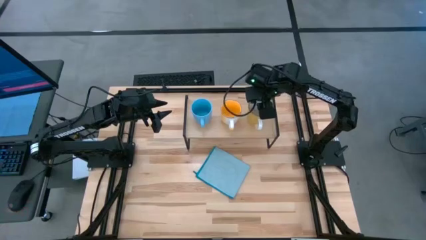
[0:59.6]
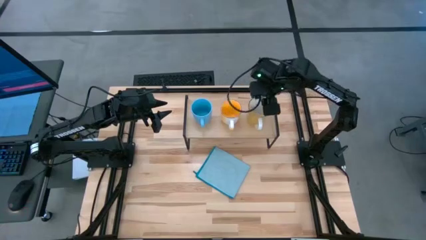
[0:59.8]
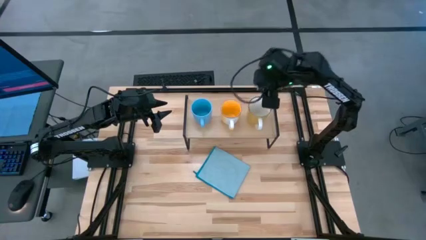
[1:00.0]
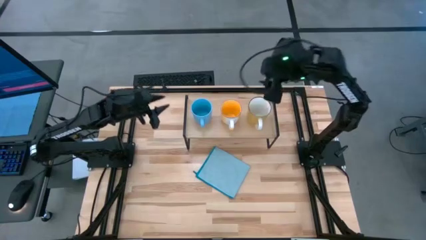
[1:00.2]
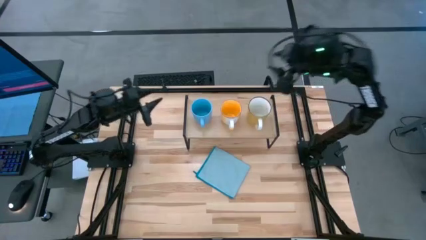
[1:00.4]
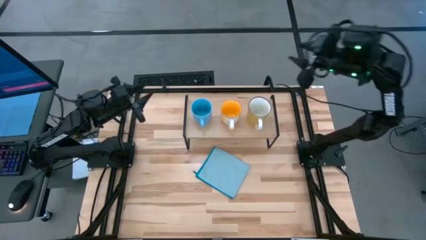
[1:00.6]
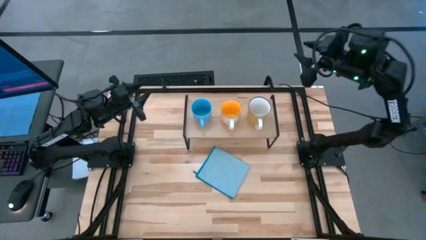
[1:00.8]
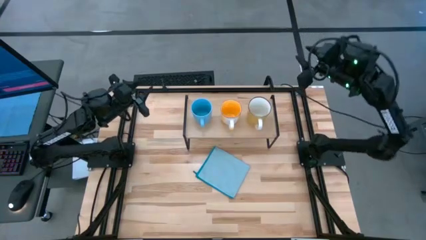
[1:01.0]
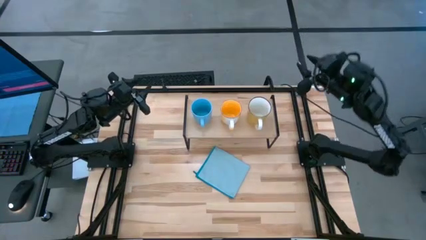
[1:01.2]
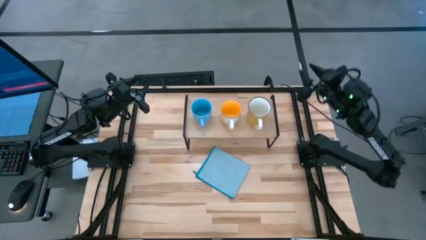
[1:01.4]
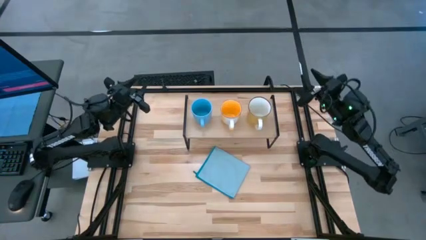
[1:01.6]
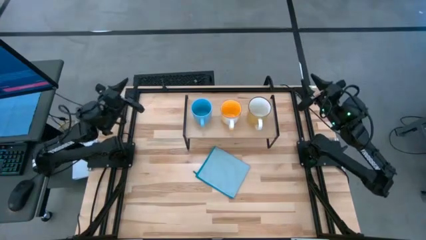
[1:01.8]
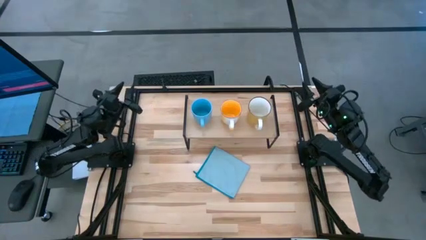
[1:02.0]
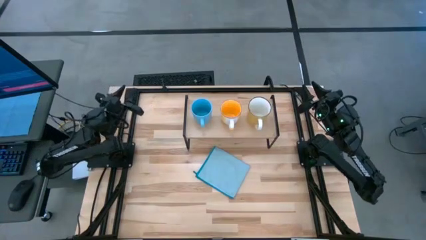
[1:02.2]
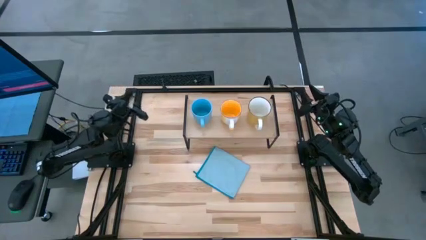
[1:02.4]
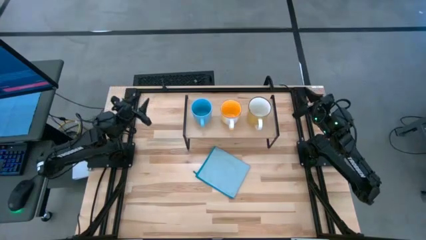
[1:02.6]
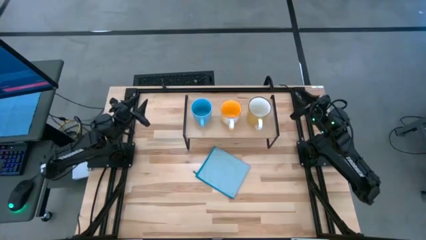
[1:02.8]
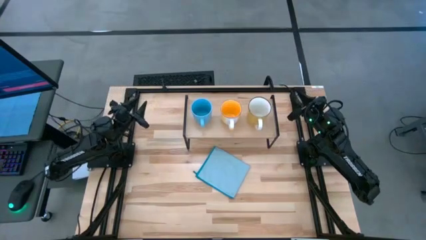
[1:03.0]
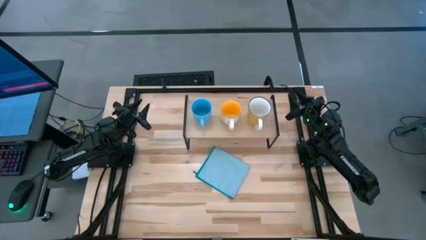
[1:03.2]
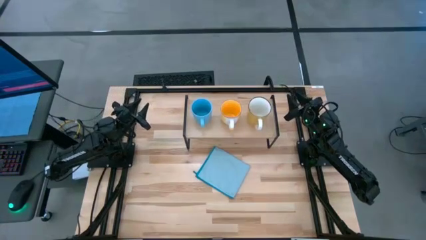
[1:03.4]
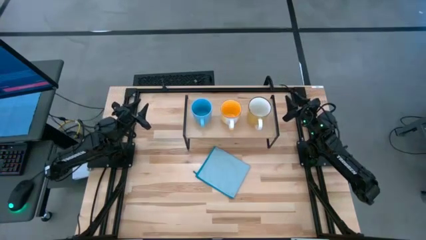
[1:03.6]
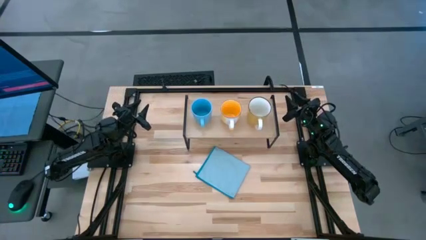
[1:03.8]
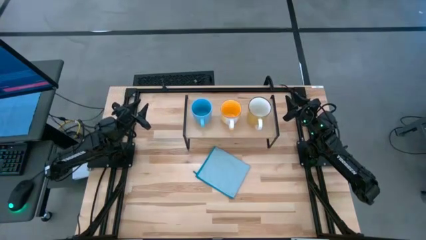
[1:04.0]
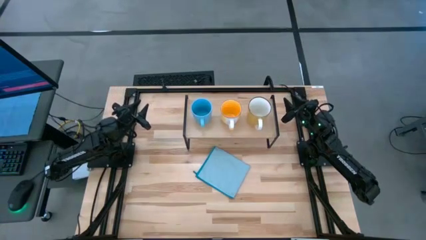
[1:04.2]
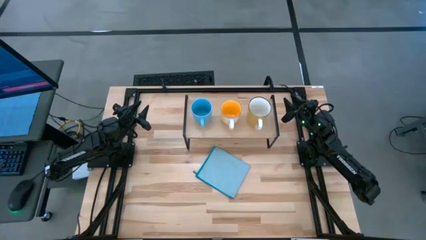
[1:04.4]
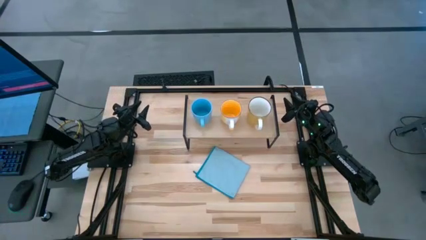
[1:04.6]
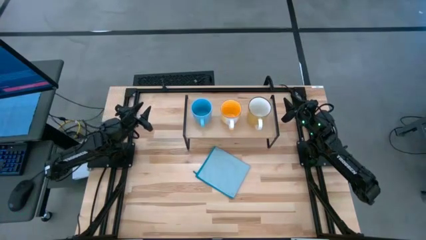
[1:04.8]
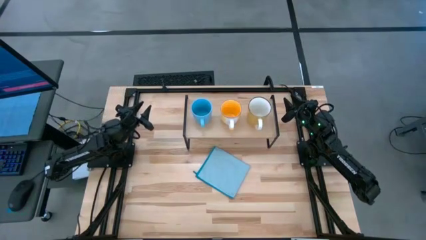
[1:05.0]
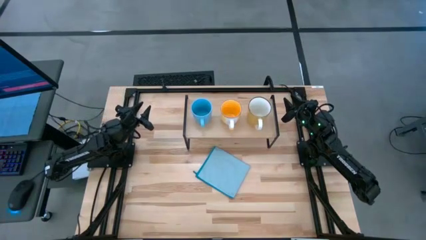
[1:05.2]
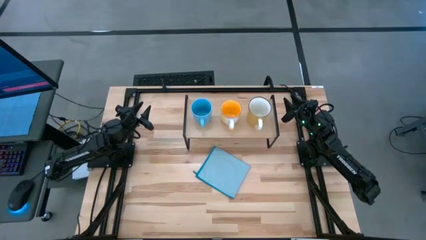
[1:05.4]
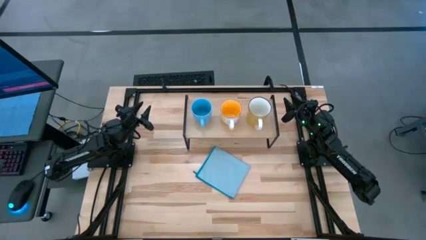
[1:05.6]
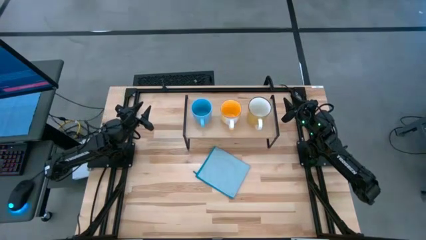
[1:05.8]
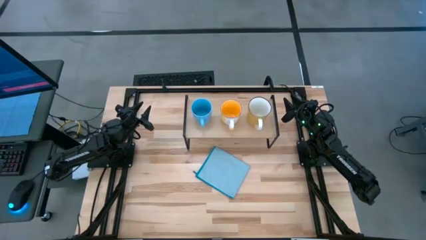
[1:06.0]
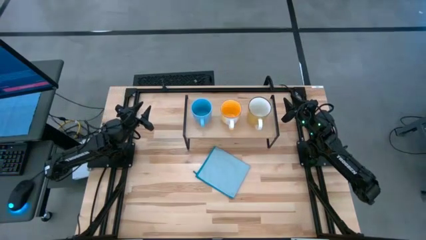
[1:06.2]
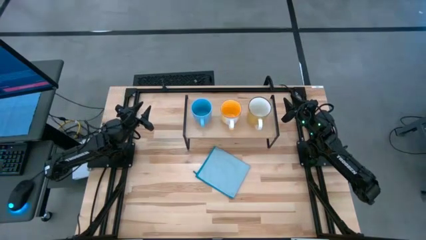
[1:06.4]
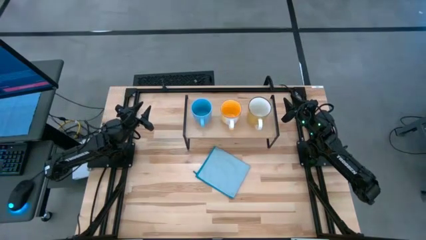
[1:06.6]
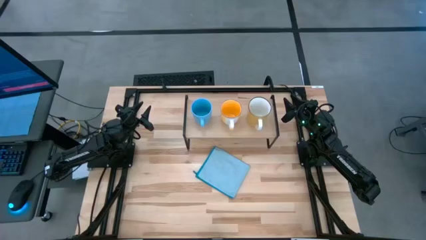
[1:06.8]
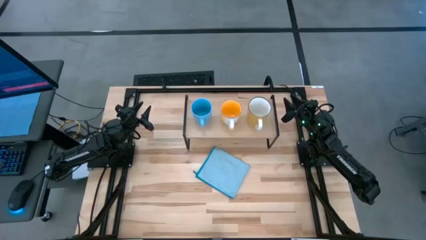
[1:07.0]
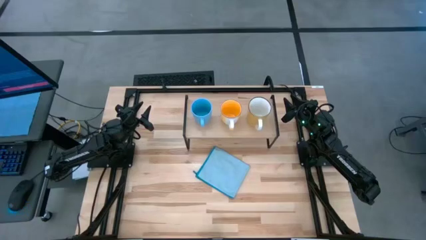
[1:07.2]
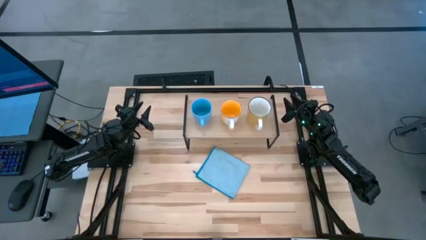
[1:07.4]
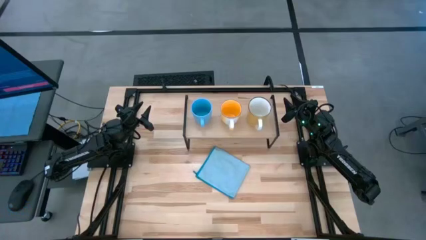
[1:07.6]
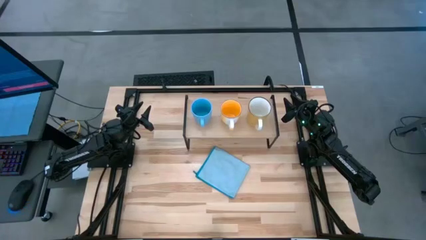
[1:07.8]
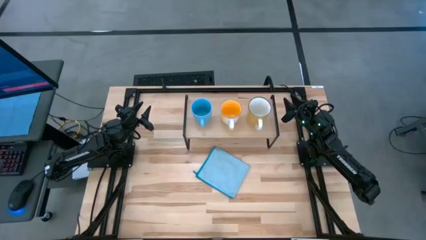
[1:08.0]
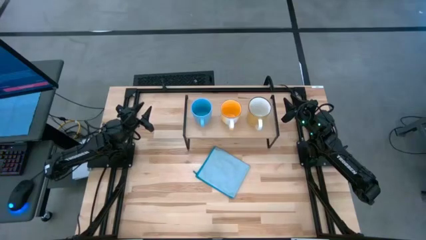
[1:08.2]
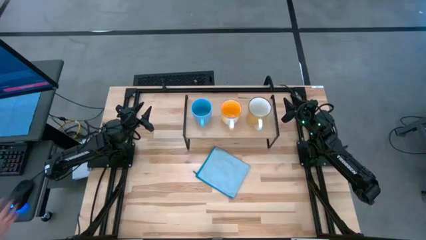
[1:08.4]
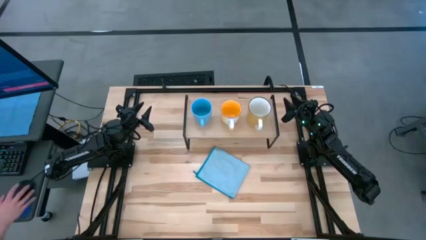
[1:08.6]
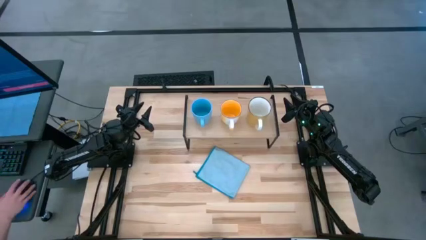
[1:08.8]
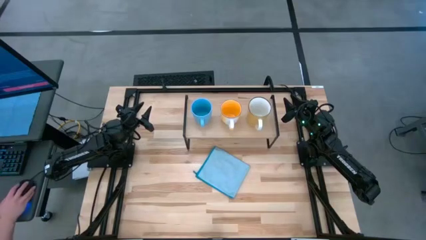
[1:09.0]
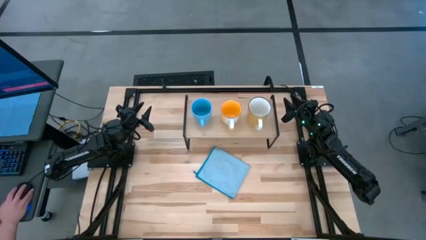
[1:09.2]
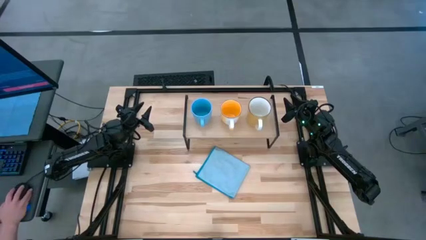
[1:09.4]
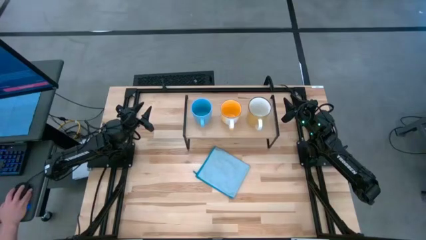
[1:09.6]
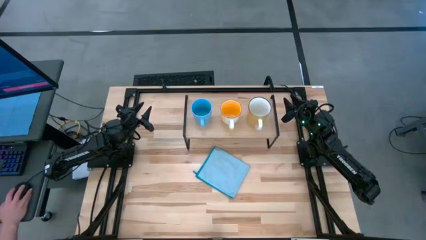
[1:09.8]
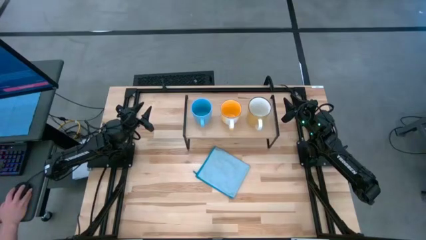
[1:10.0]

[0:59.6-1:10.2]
Task: Stack small to large cups/mugs on shelf
Return to Home Position

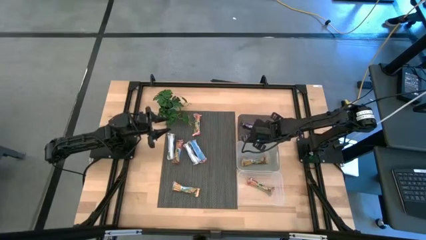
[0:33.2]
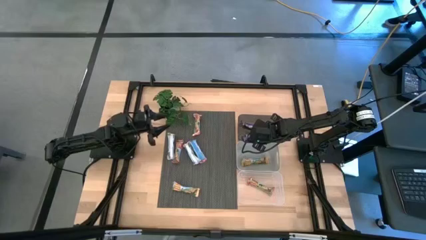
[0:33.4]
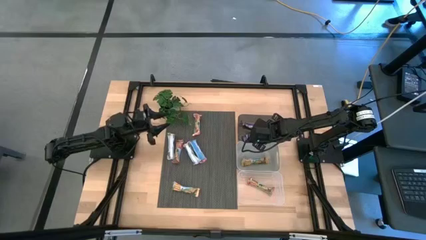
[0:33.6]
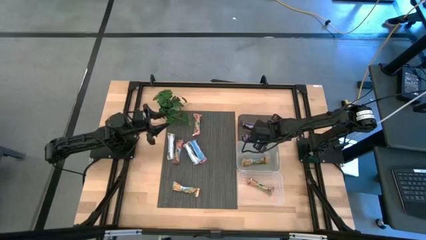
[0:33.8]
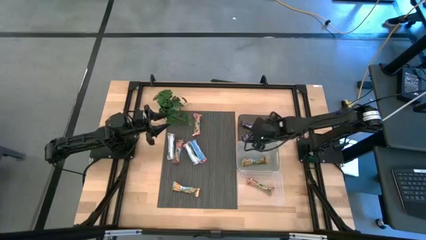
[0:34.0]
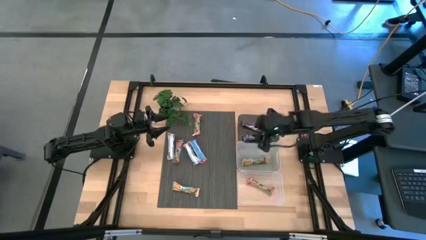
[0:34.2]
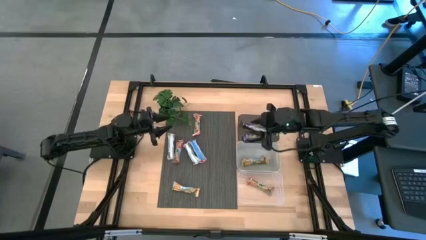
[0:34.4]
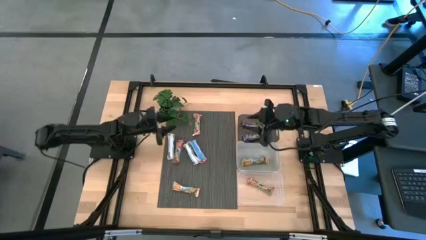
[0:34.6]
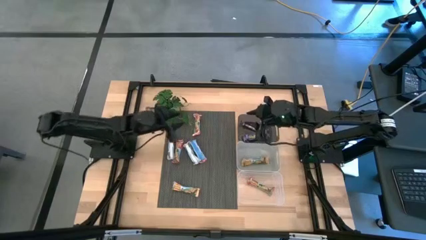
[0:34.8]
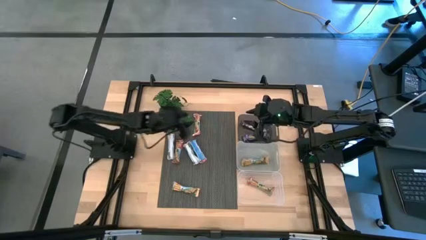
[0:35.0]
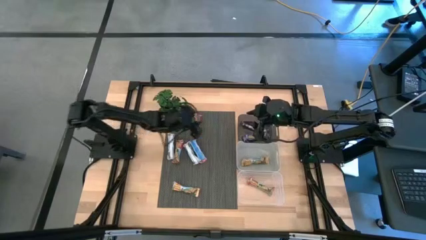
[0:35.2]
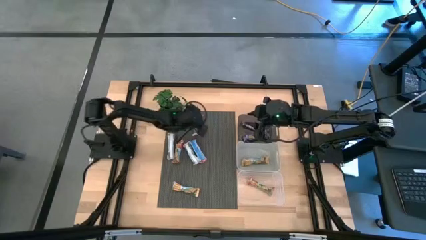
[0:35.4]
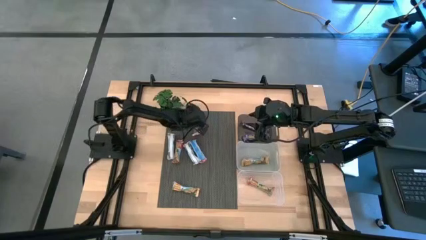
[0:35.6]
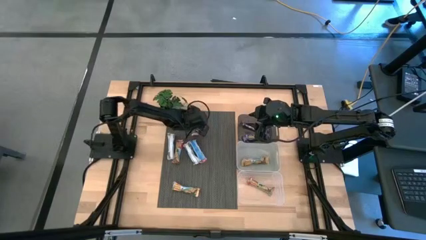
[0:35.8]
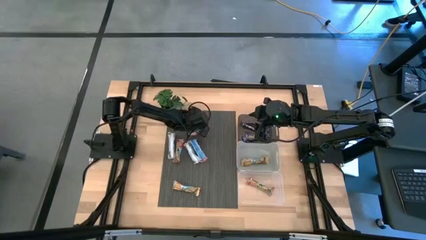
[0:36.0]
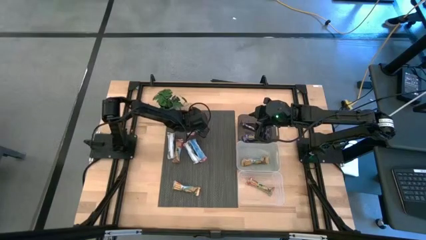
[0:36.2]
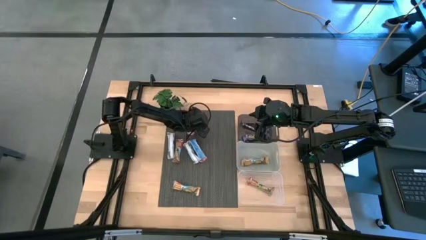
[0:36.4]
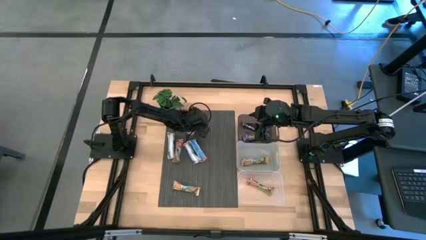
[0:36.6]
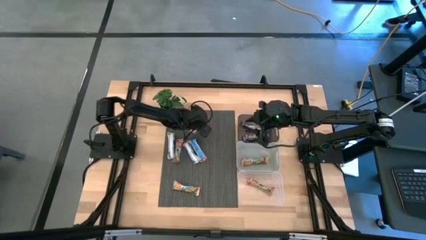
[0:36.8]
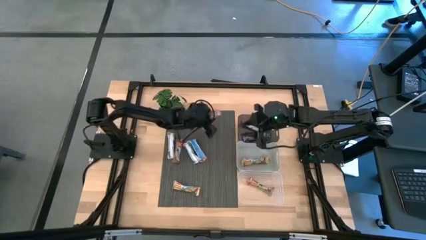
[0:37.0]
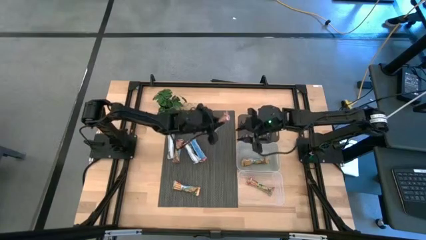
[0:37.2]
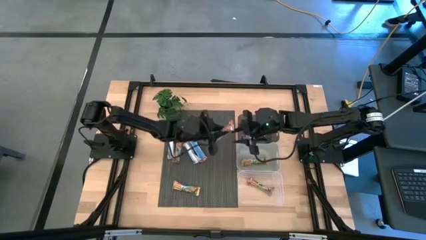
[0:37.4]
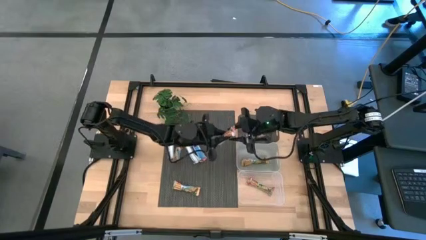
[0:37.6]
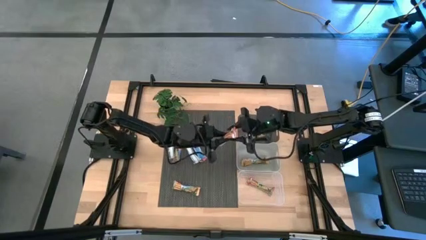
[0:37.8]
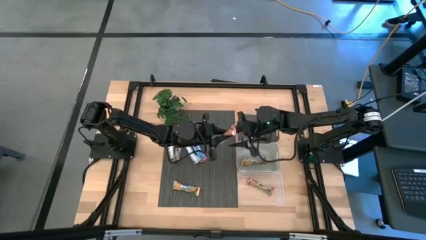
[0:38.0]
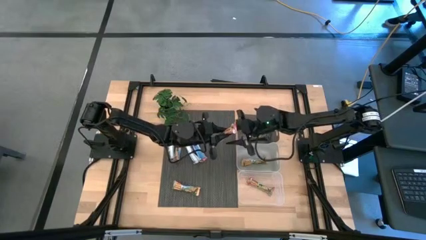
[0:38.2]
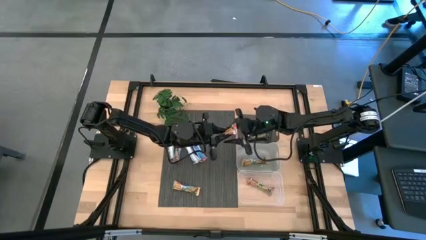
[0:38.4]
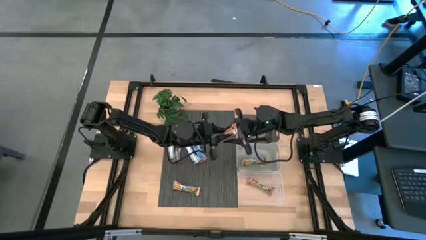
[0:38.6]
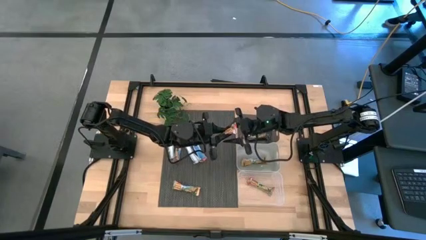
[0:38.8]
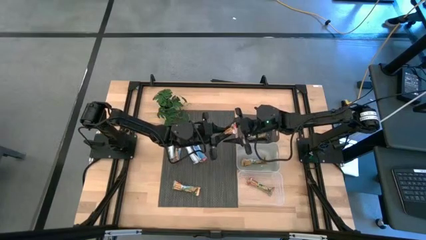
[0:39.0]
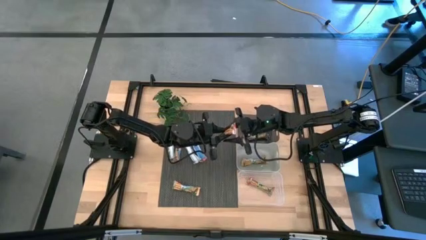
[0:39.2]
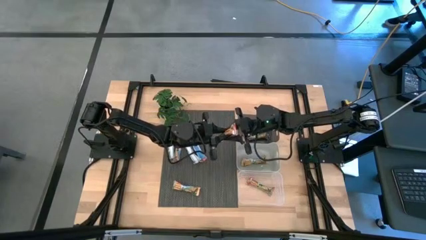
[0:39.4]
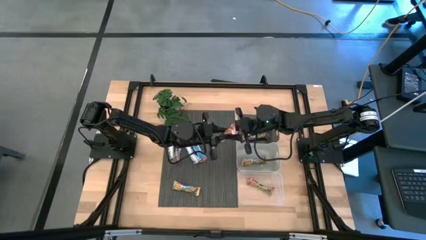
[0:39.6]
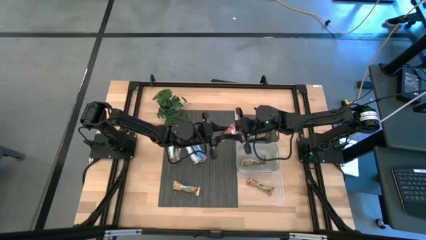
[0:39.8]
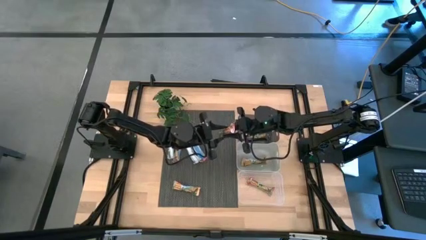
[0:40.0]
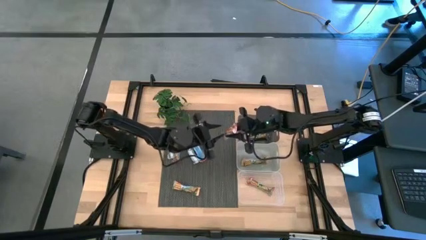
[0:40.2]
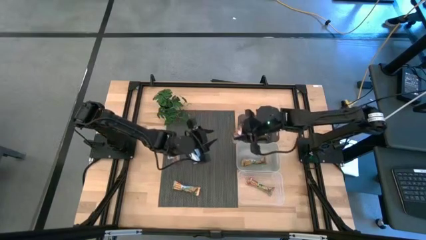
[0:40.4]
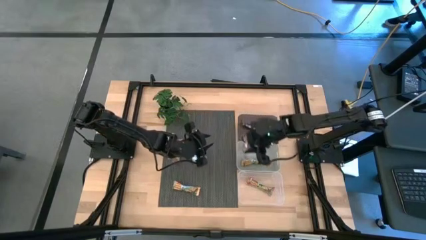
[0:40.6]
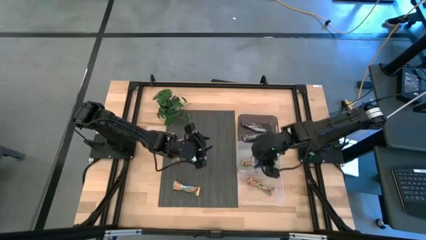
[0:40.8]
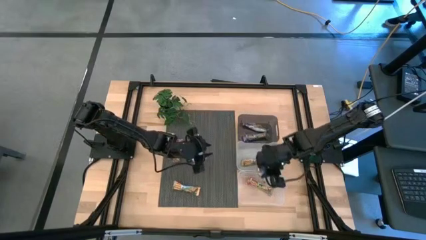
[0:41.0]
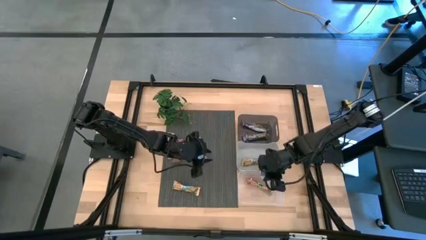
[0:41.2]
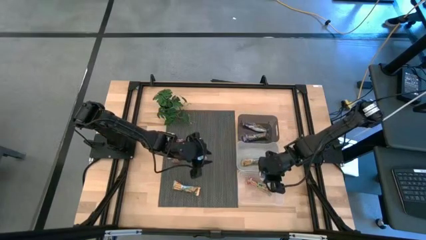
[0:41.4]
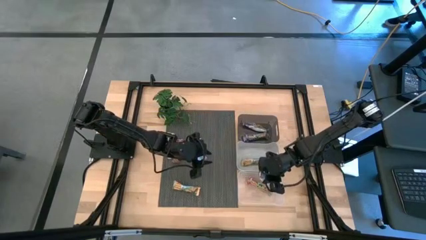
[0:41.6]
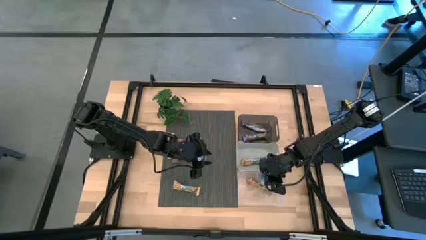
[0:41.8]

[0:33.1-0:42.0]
Task: Pick and place Granola Bars by type
Put the red granola bar into the transparent bin
